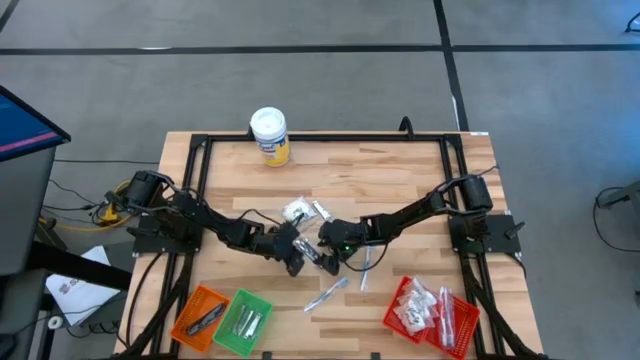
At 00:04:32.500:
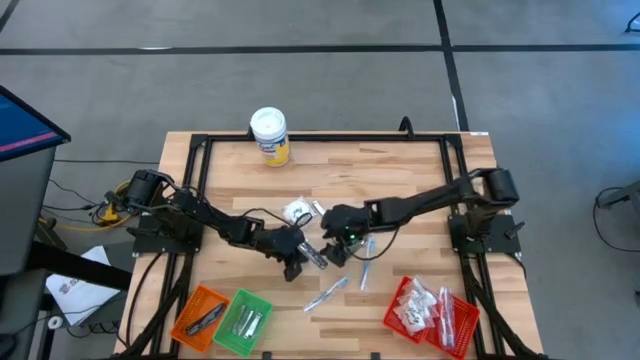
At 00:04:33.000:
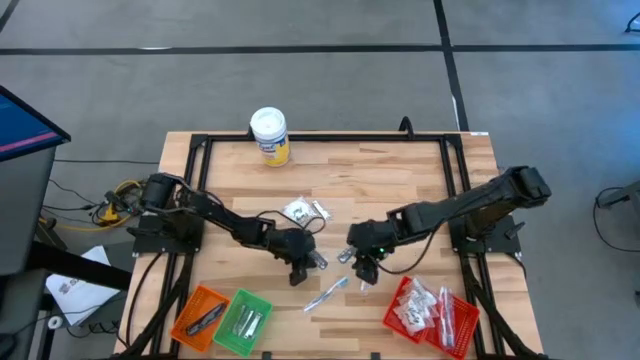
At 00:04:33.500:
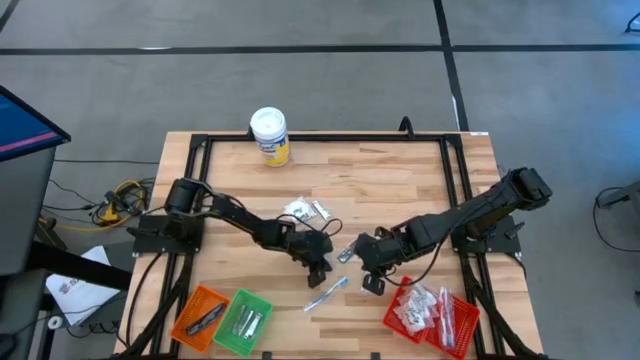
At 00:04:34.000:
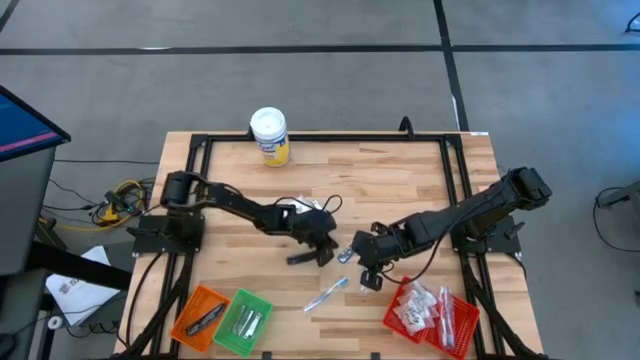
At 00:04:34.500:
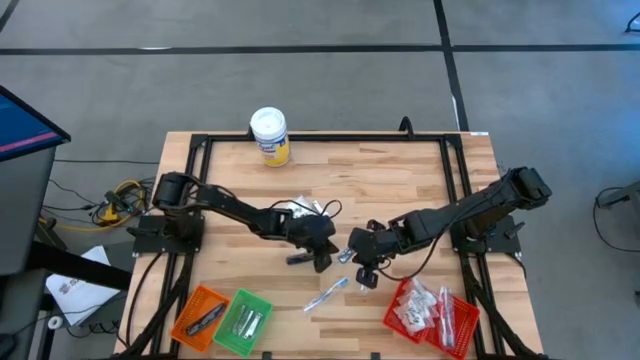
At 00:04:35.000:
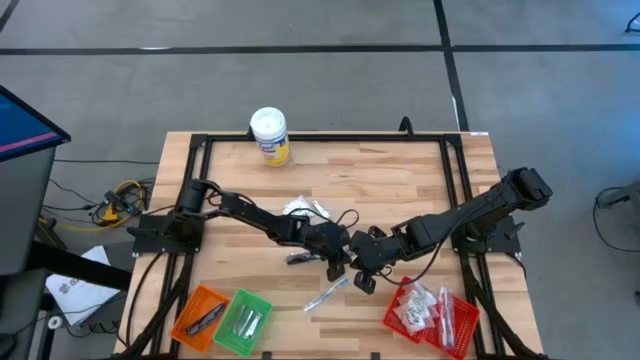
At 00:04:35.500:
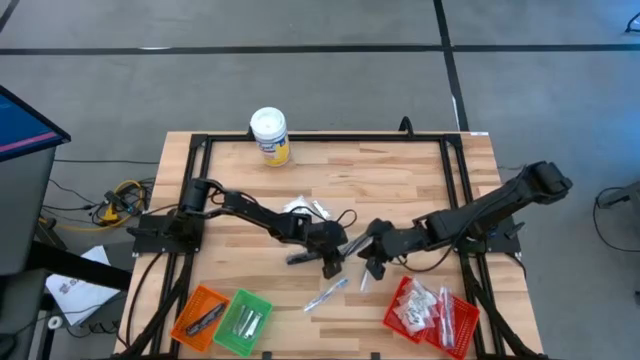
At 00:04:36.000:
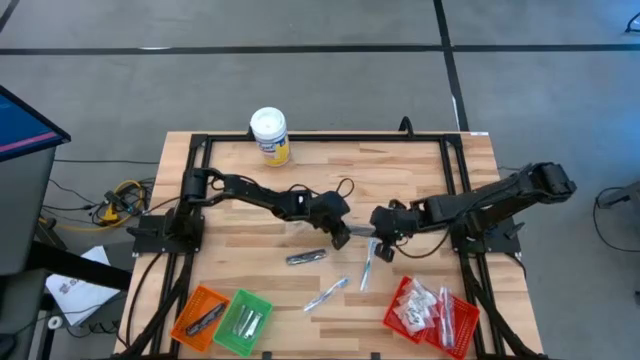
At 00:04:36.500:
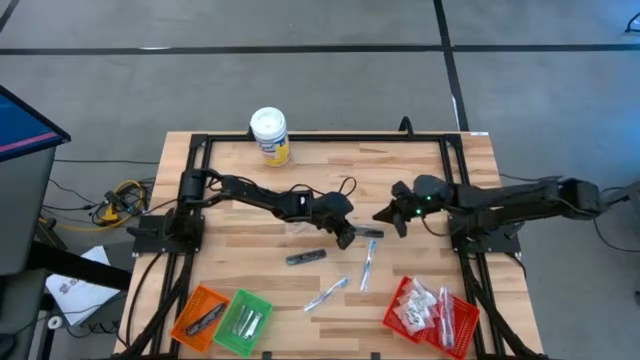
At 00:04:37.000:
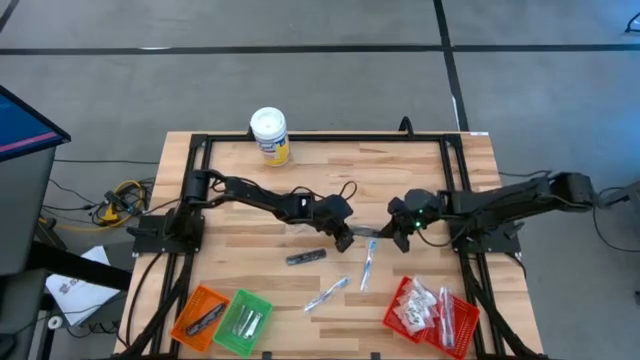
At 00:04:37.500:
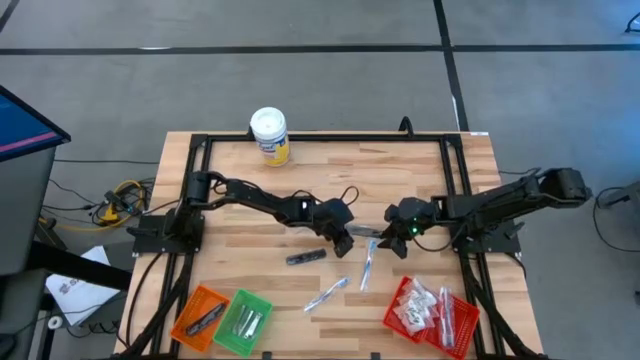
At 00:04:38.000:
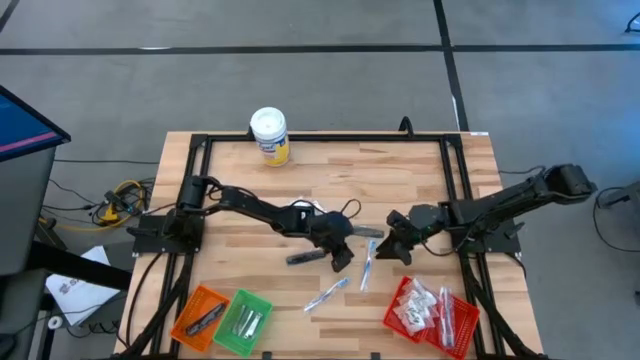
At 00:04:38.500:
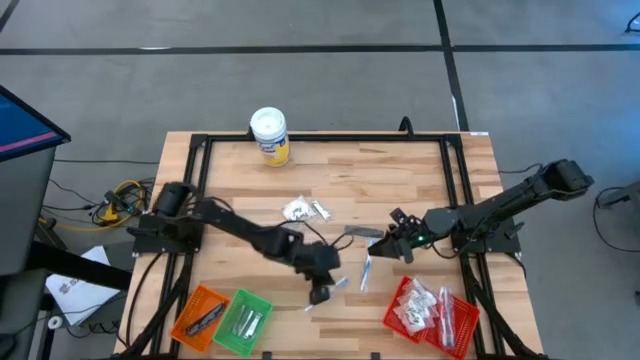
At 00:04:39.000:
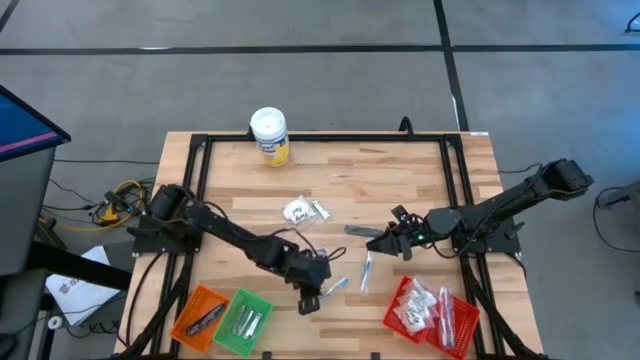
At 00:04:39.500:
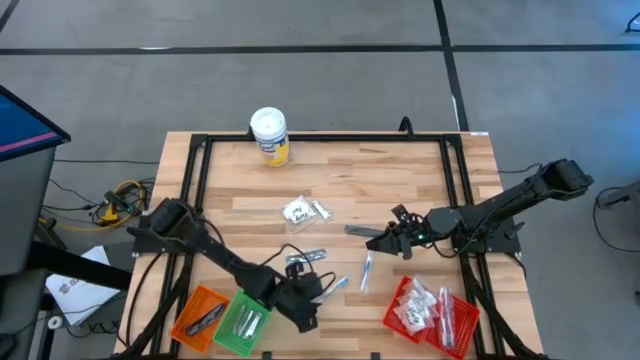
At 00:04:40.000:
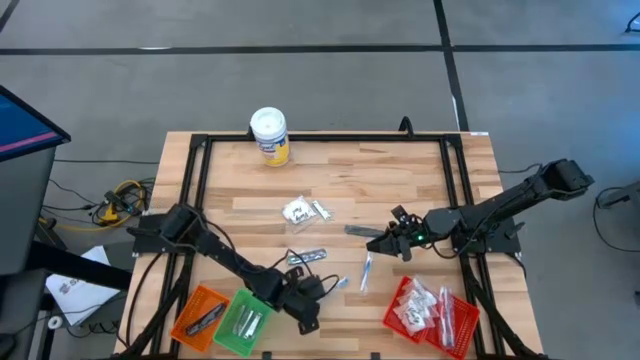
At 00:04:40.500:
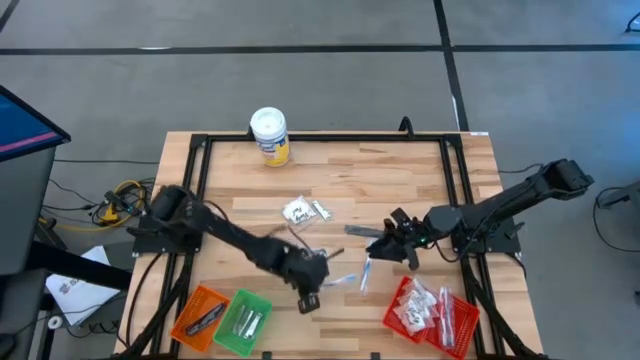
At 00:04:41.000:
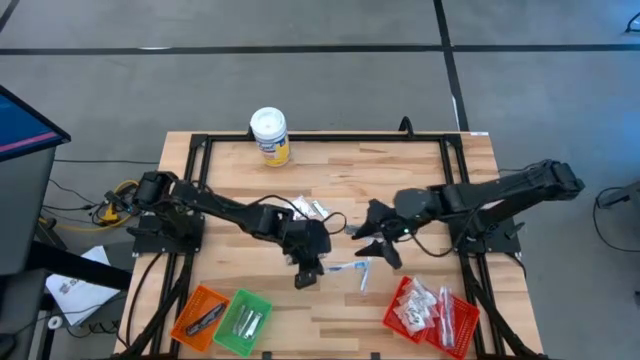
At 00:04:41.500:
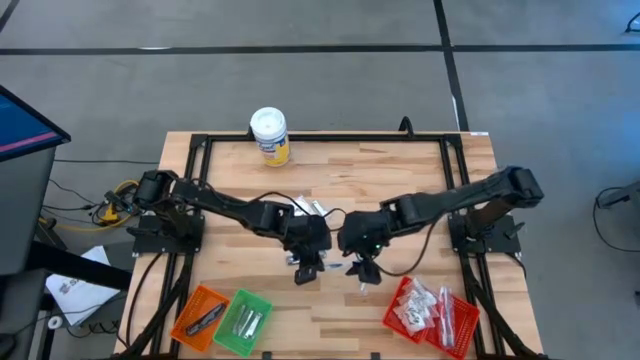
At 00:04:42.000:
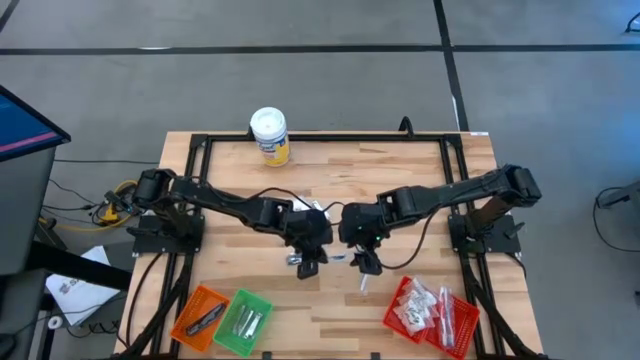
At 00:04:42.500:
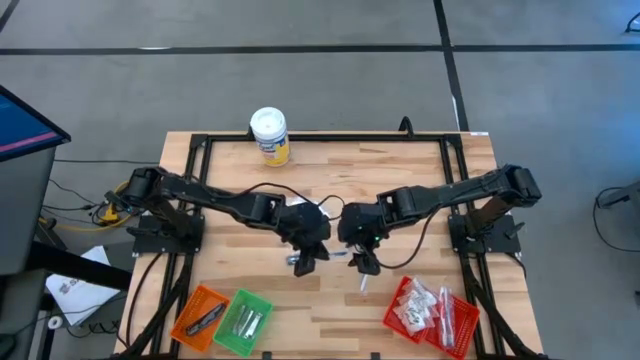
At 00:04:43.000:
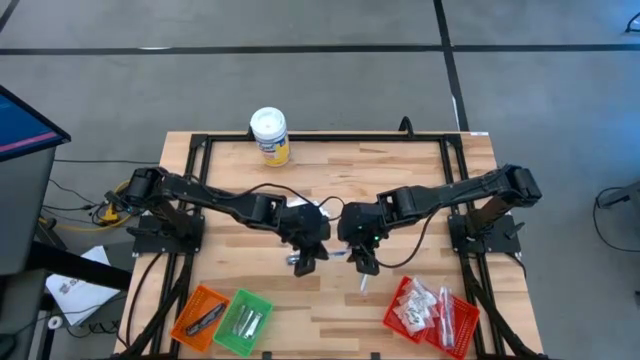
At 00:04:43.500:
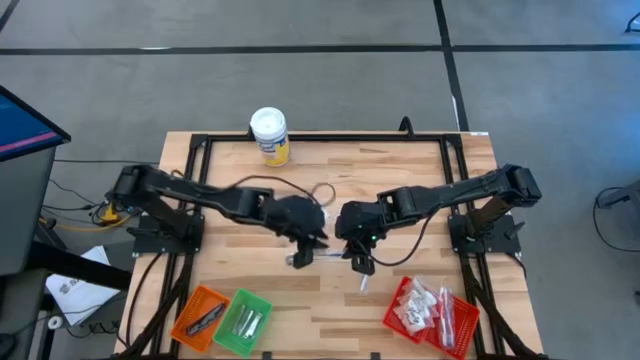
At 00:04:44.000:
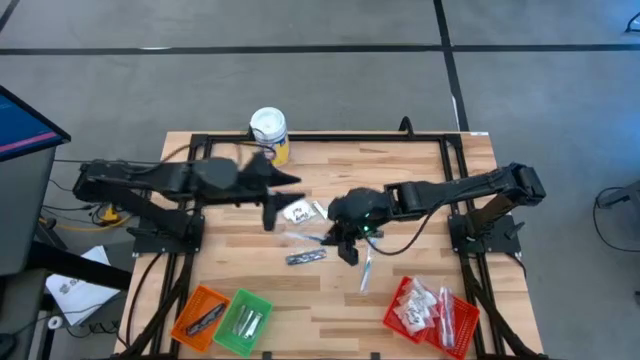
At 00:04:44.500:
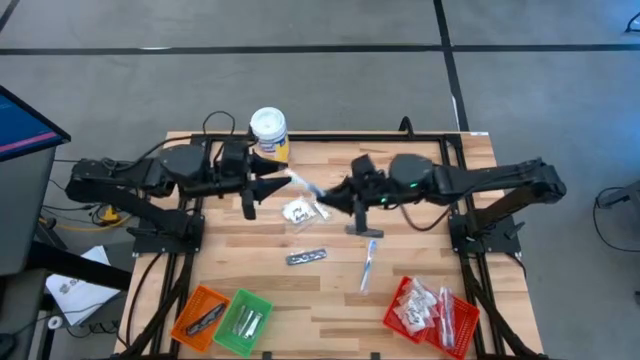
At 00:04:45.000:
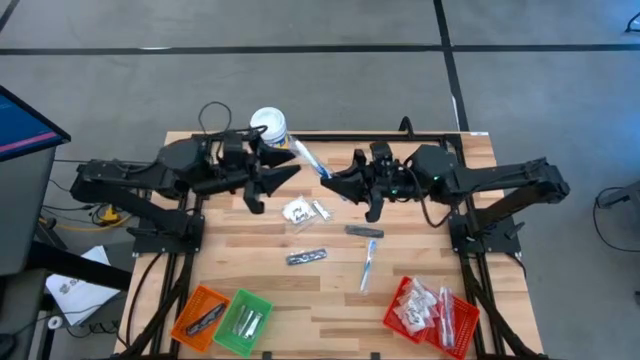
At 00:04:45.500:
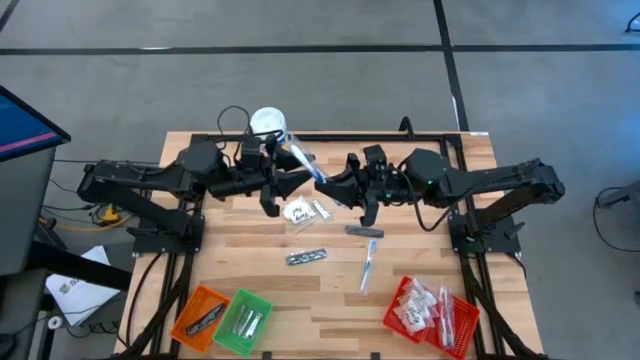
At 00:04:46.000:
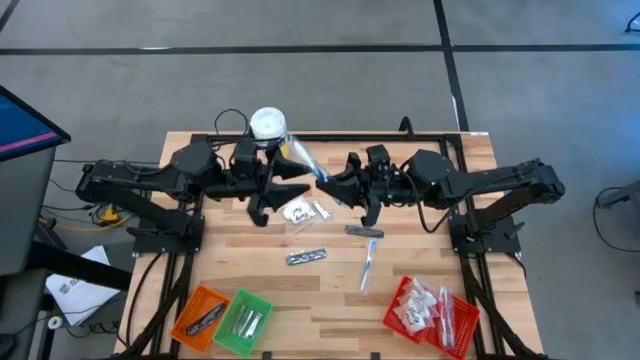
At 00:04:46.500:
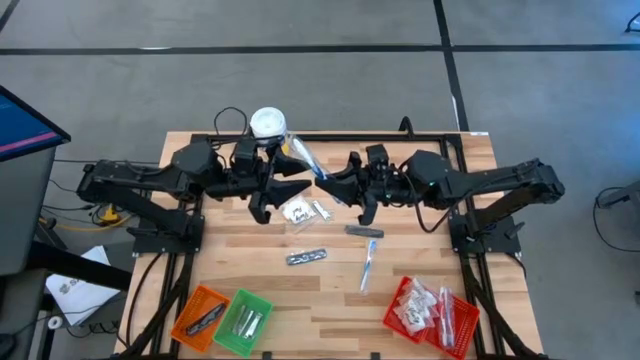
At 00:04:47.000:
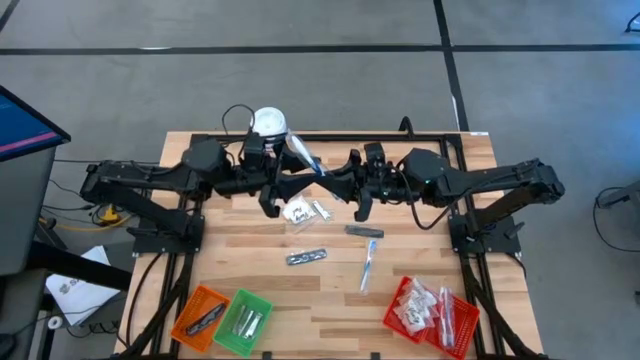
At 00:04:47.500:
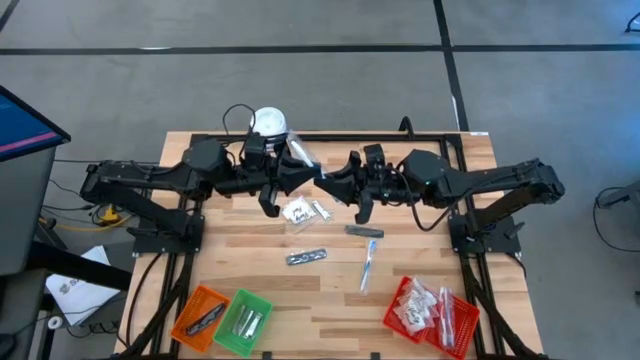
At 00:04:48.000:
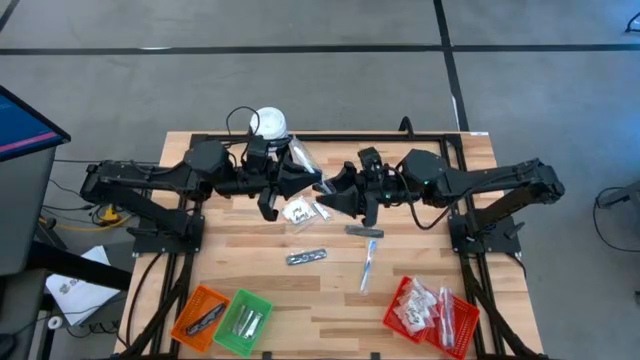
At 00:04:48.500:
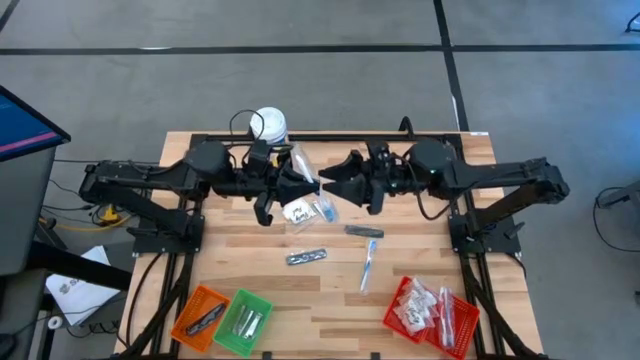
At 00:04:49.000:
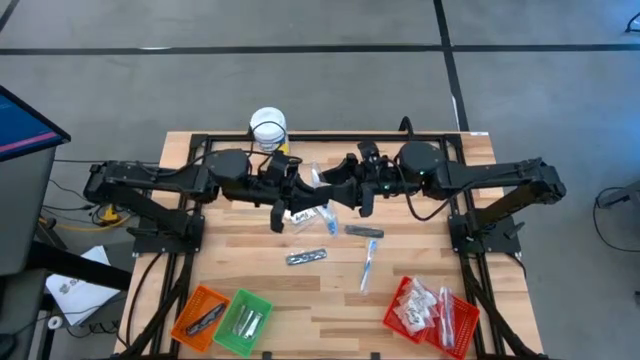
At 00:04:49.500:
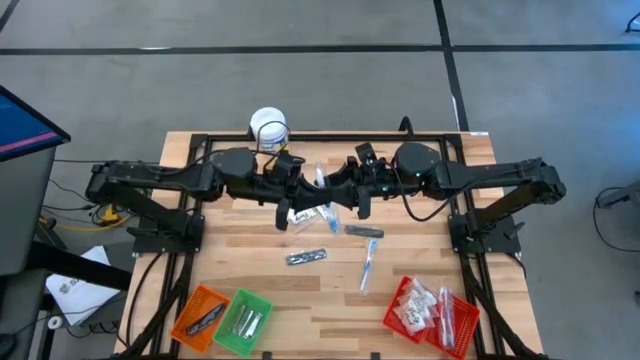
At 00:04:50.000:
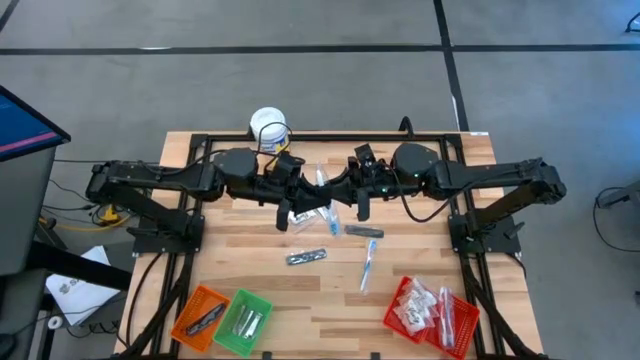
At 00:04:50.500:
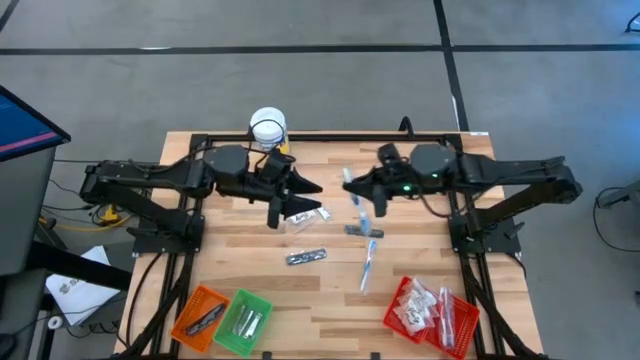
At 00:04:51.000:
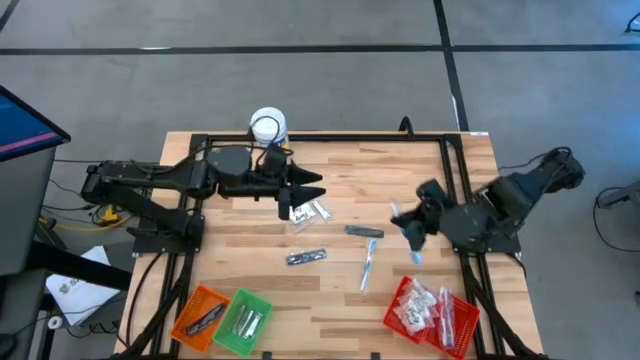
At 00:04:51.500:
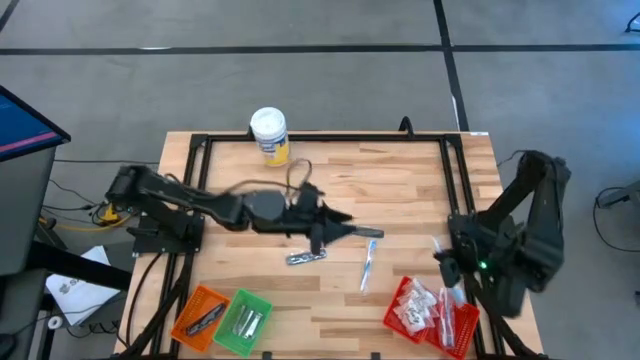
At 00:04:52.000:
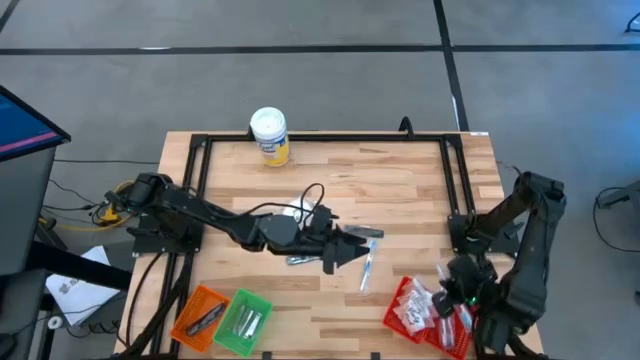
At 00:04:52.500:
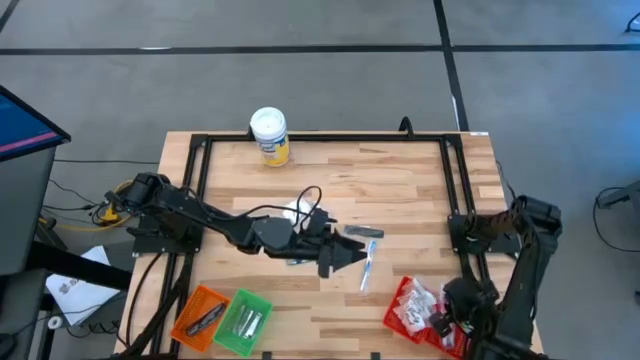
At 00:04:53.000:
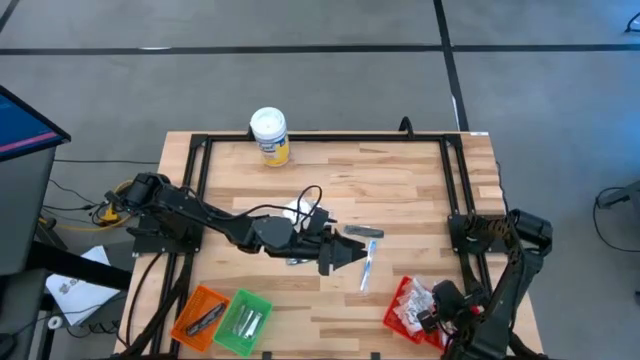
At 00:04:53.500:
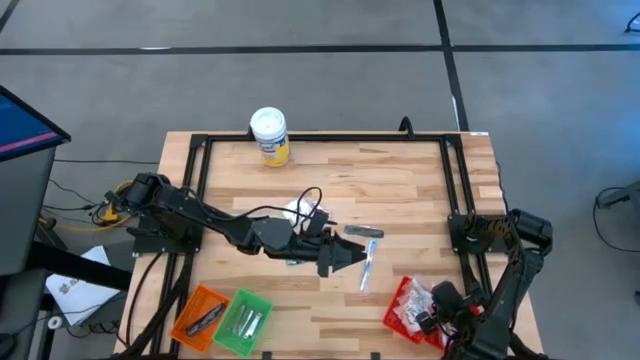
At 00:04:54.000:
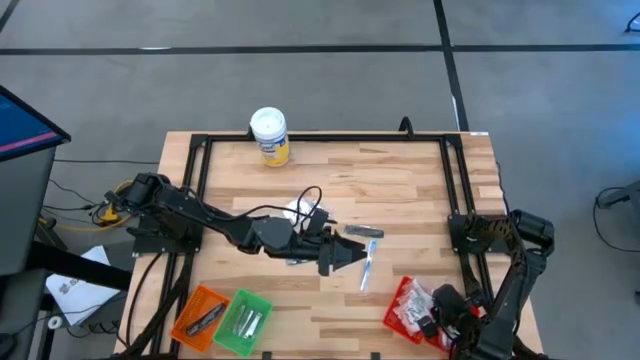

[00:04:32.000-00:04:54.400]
Task: Pick & Place Travel size toiletries
Put the blue toothbrush into the right red basket
